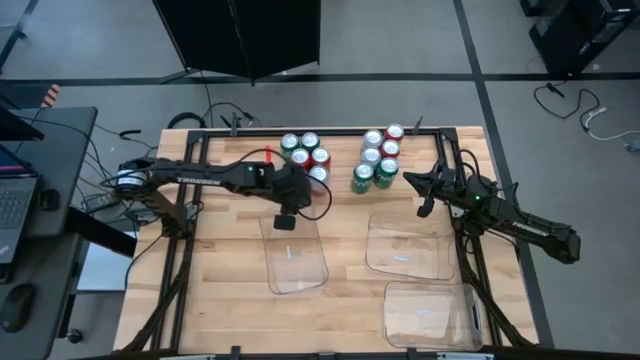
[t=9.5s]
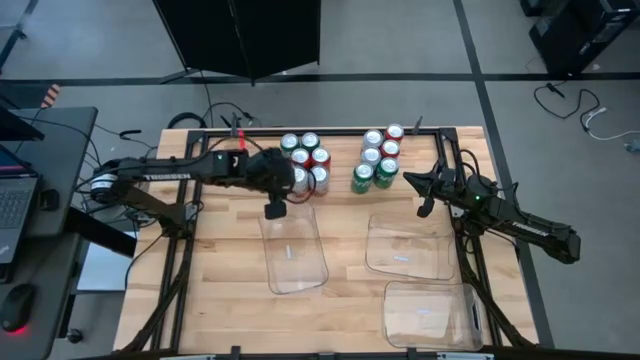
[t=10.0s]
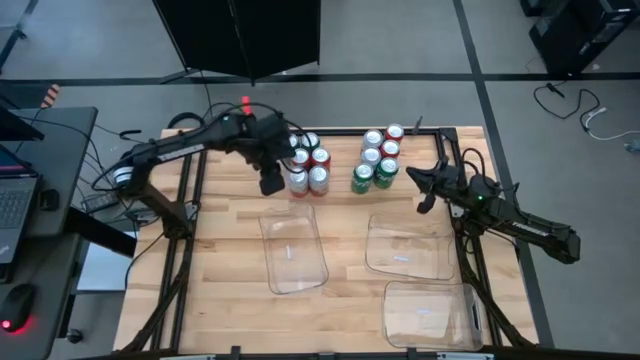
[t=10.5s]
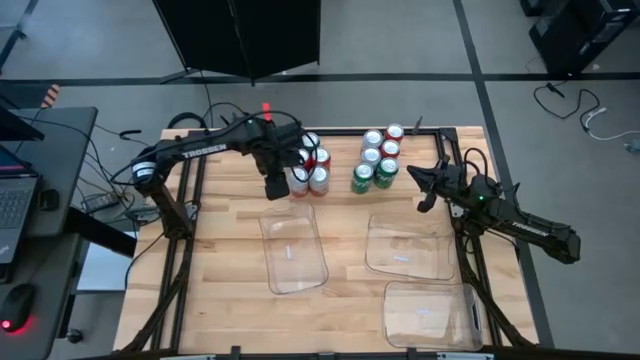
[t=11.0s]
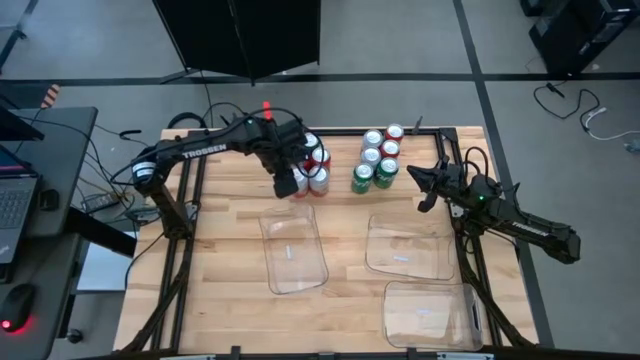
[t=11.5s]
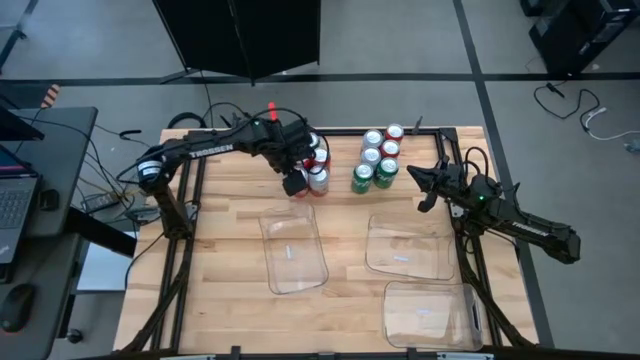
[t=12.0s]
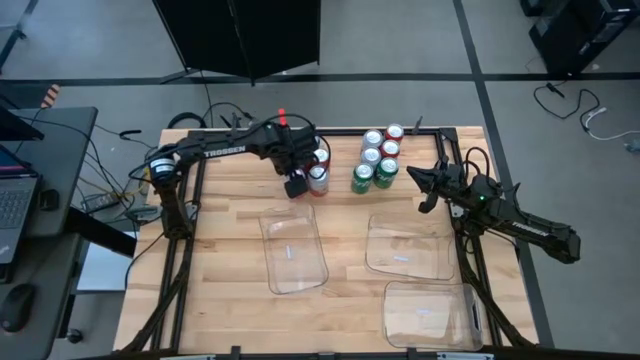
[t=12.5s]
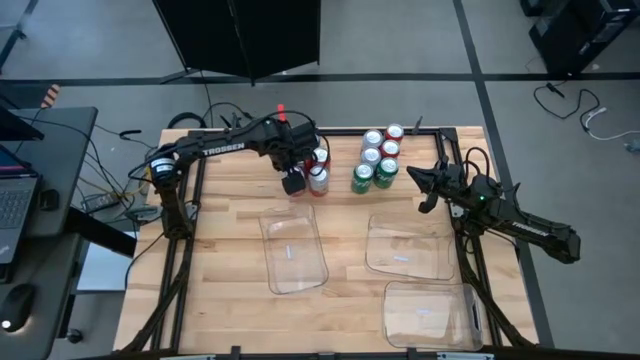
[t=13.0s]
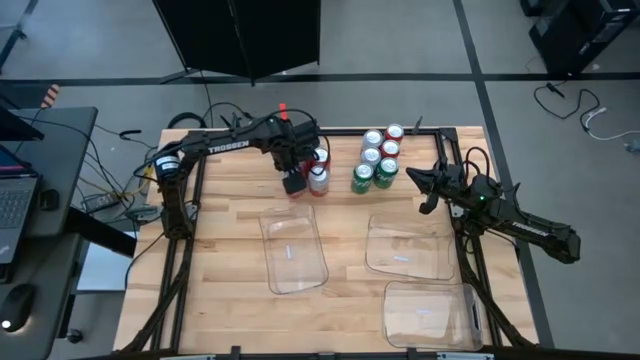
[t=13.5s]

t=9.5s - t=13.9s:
Task: Sort soda cans
Adjust the pink and white soda can

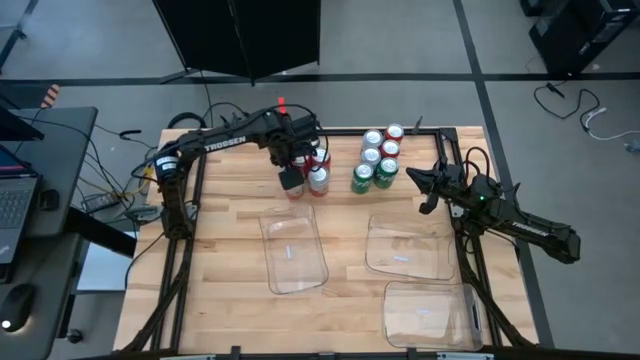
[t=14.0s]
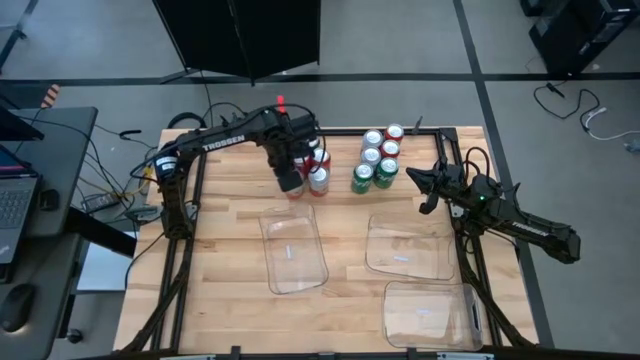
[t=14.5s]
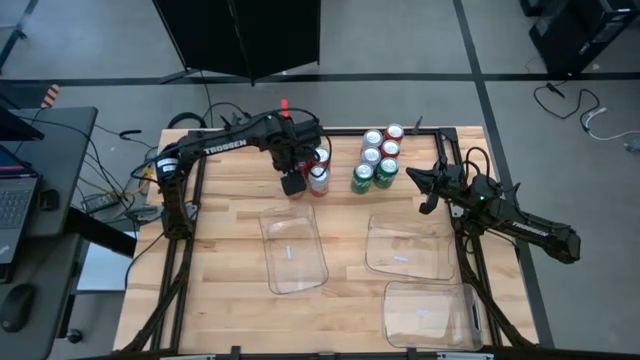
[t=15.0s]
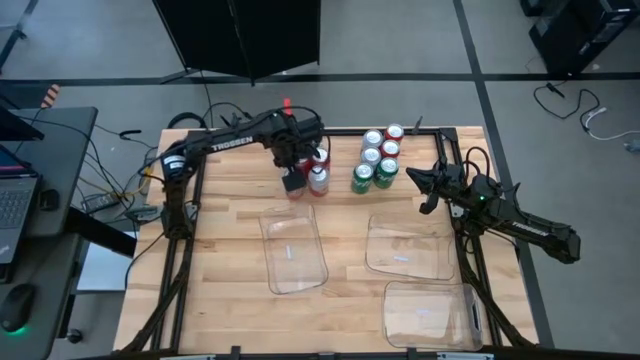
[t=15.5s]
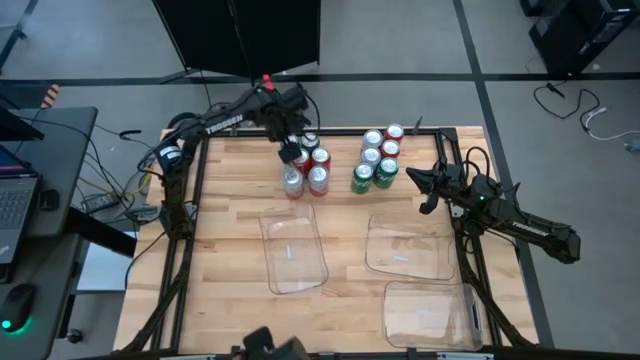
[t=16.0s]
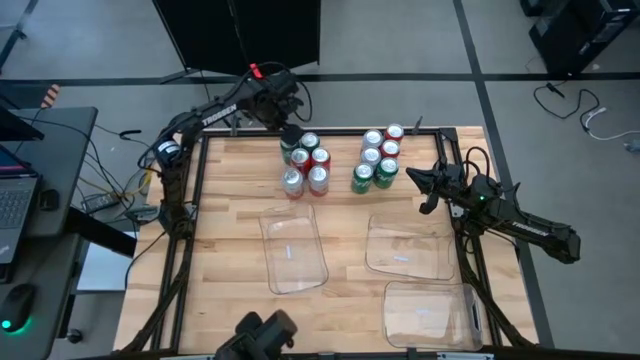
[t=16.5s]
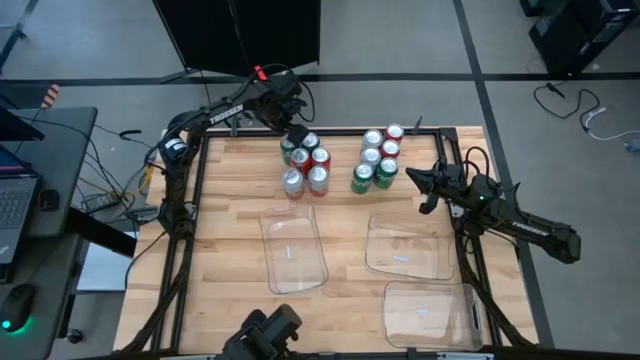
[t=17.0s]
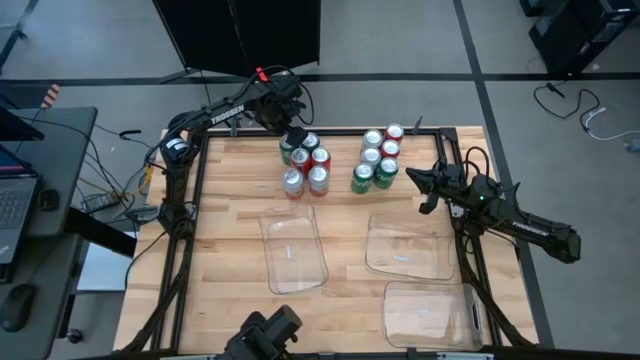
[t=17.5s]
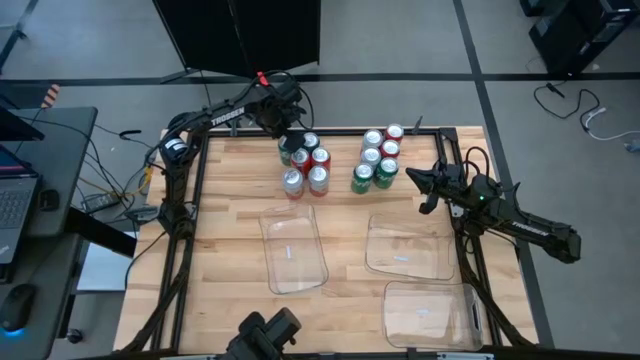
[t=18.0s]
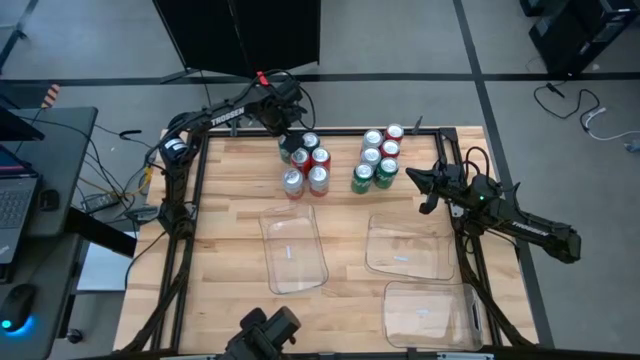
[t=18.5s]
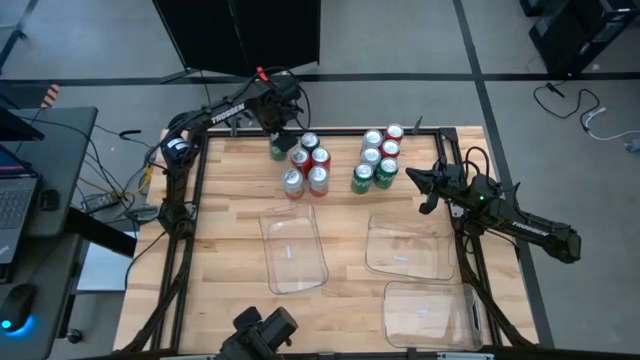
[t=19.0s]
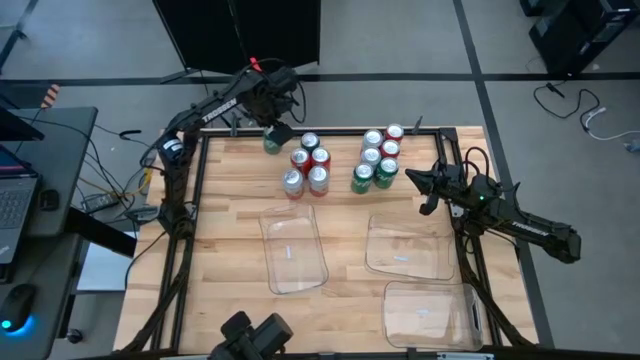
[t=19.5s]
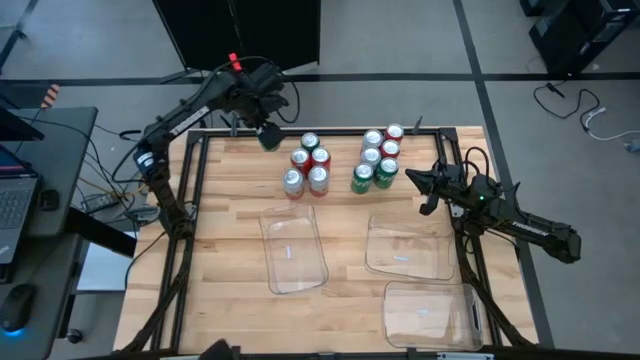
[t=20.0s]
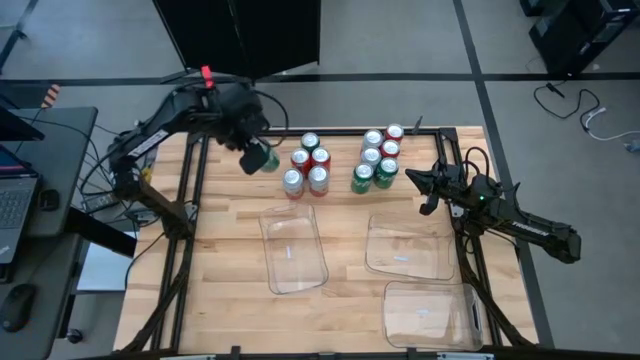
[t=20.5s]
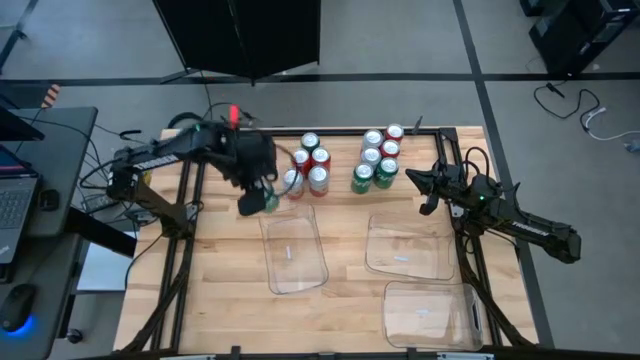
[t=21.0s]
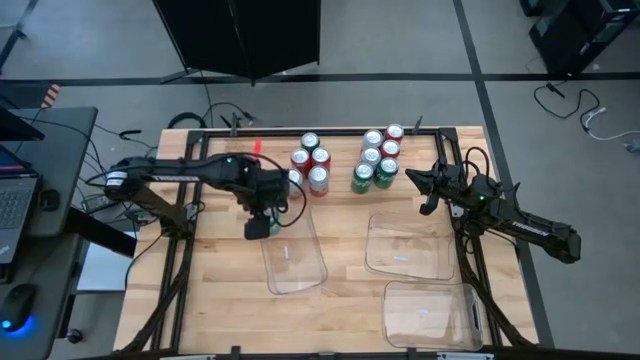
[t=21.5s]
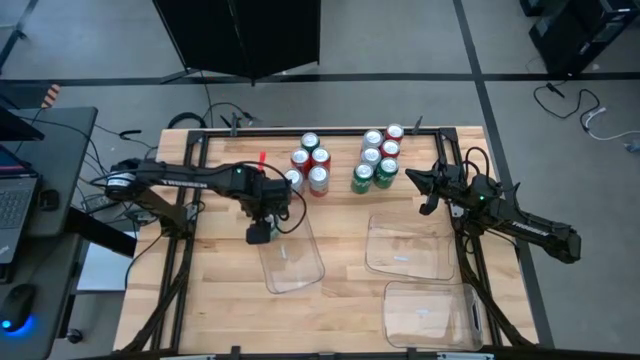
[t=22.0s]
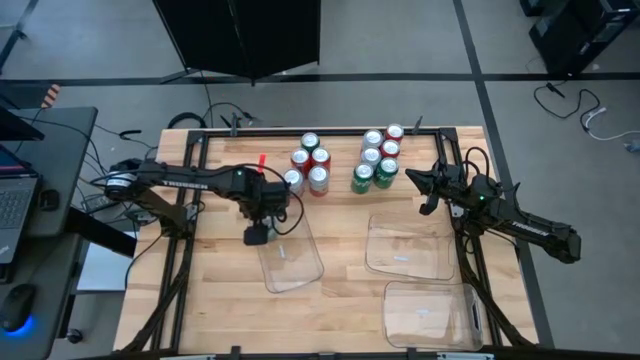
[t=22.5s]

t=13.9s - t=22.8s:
Put the top left green soda can into the top left transparent bin

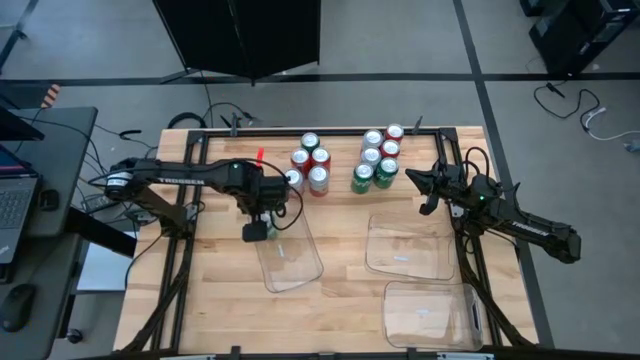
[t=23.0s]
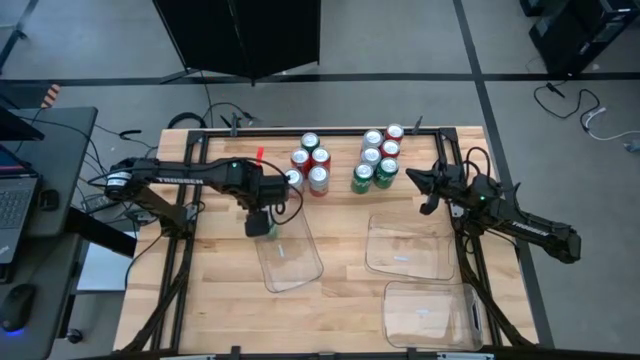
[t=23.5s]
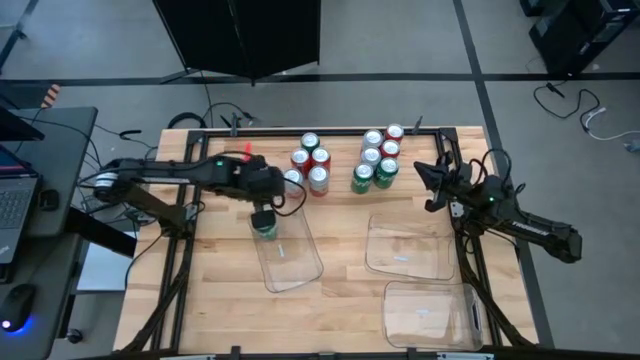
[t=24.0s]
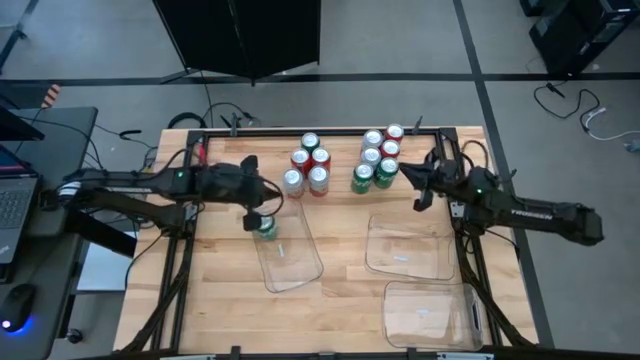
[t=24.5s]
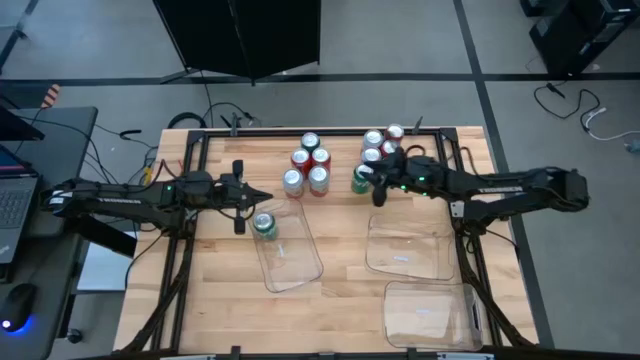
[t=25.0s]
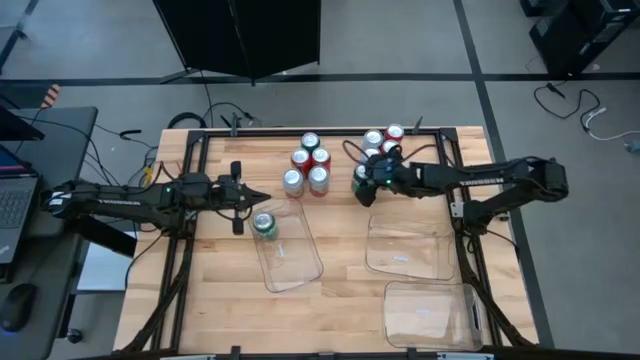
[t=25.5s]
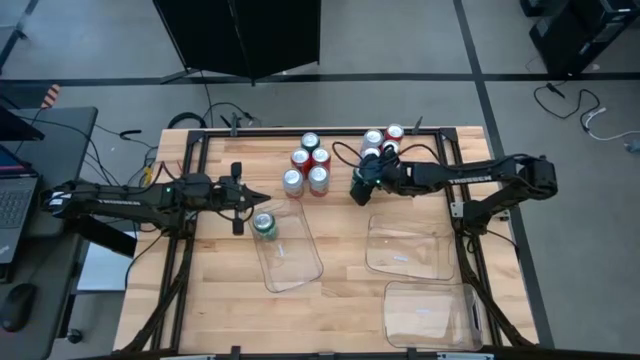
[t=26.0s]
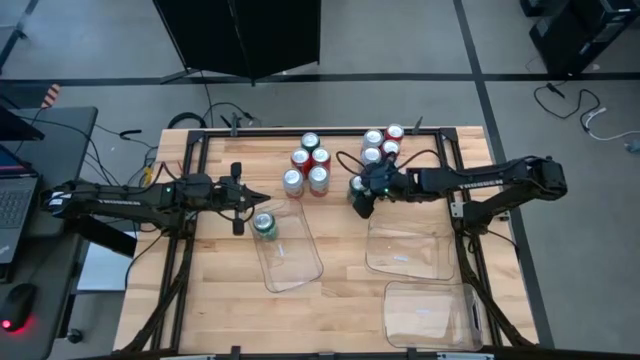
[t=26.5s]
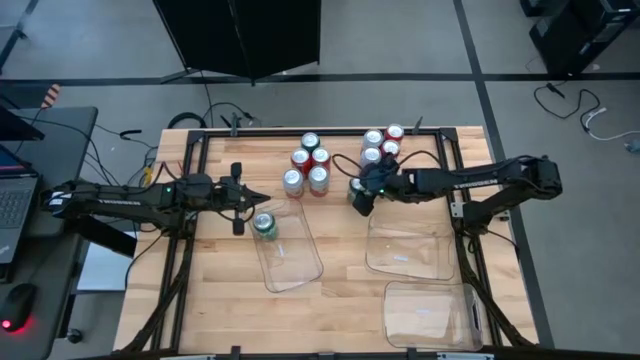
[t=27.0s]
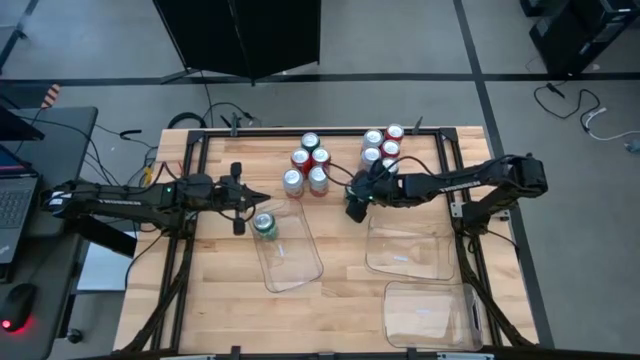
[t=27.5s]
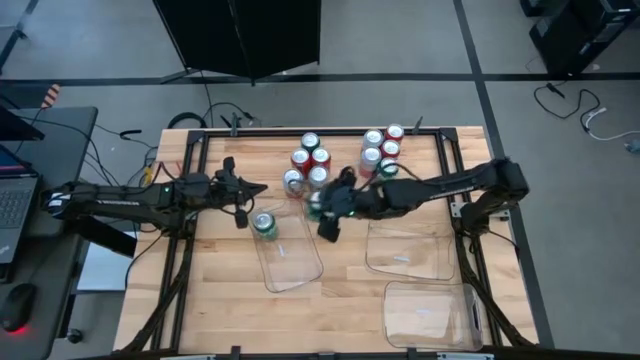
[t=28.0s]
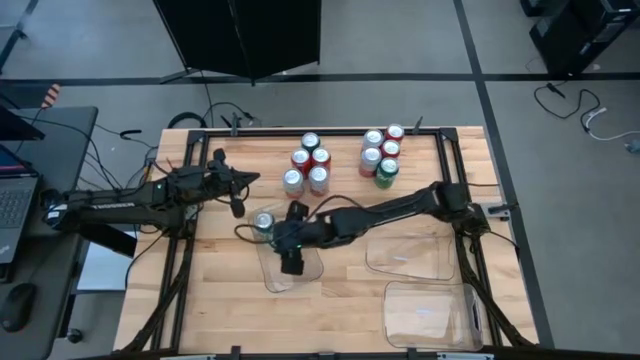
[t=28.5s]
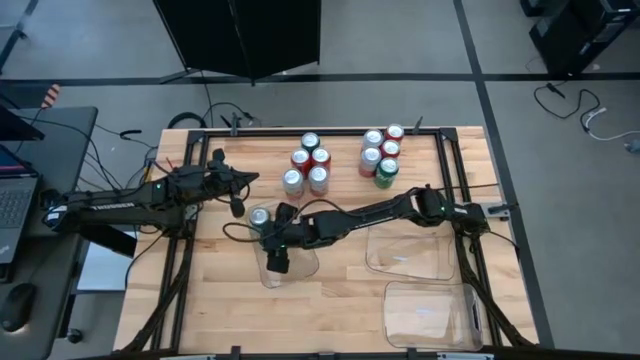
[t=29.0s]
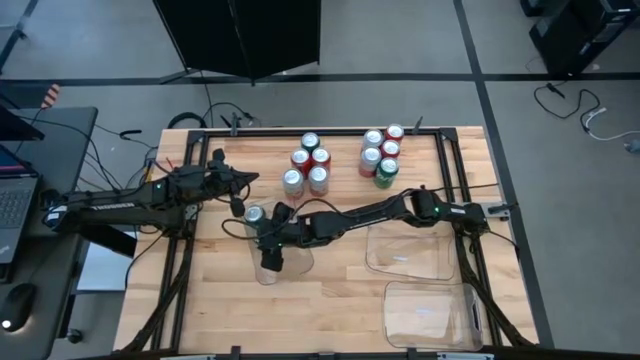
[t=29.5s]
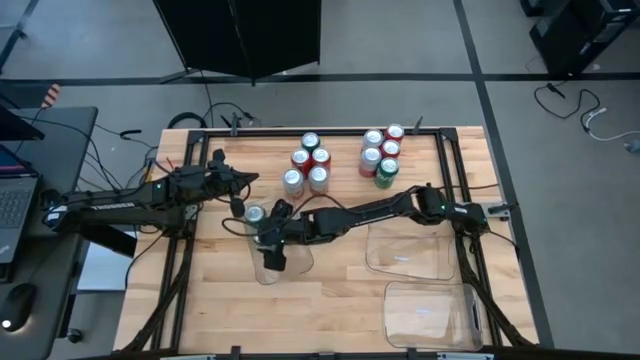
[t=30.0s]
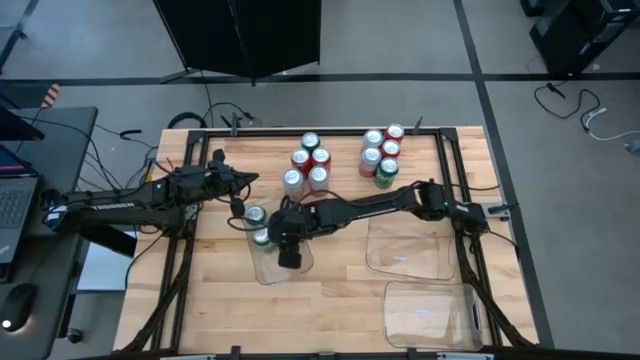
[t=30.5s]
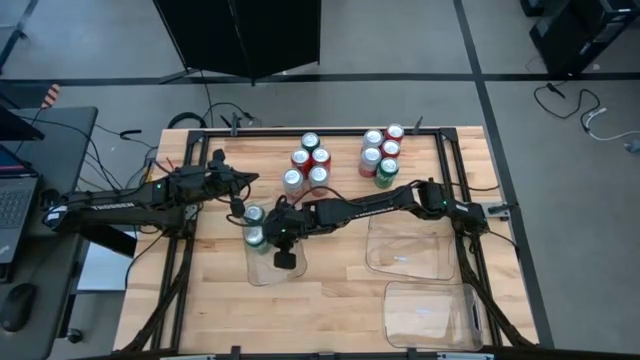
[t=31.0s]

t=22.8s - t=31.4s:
Put the center green soda can into the top left transparent bin
